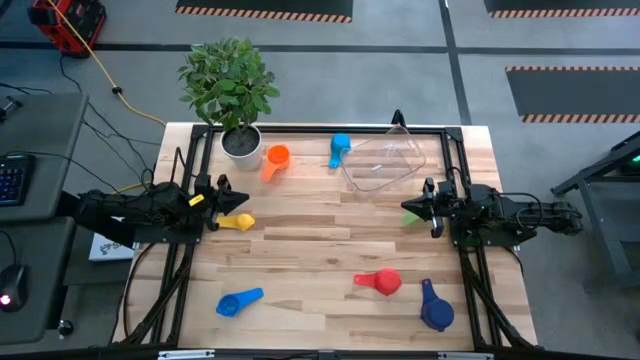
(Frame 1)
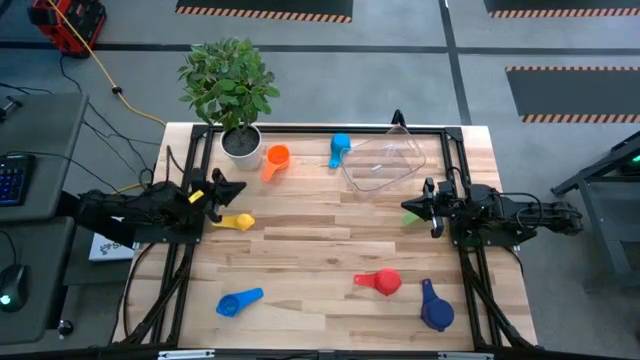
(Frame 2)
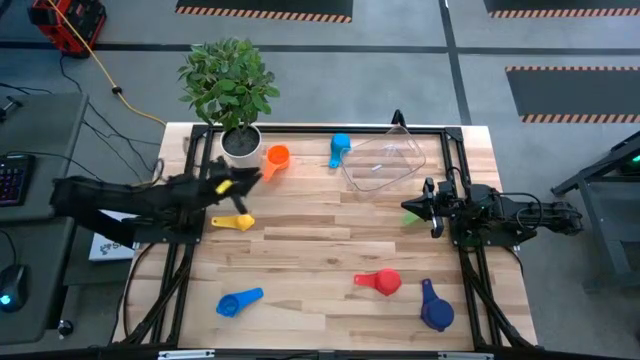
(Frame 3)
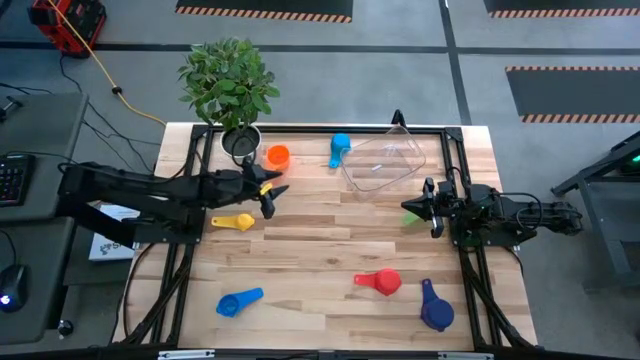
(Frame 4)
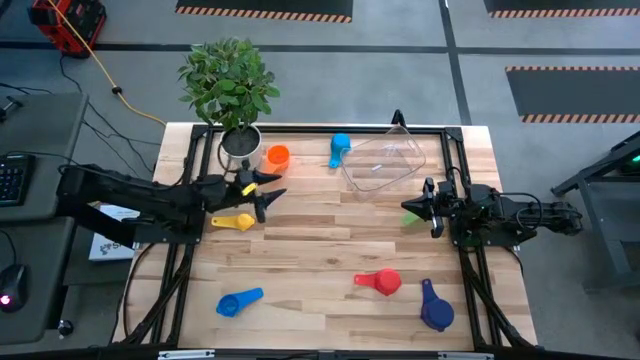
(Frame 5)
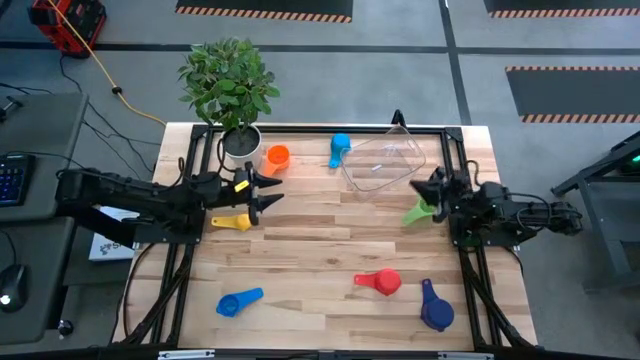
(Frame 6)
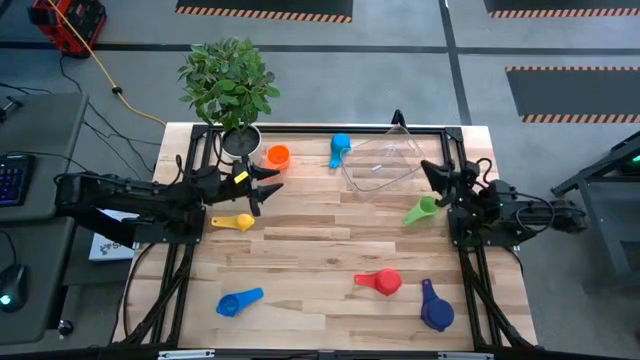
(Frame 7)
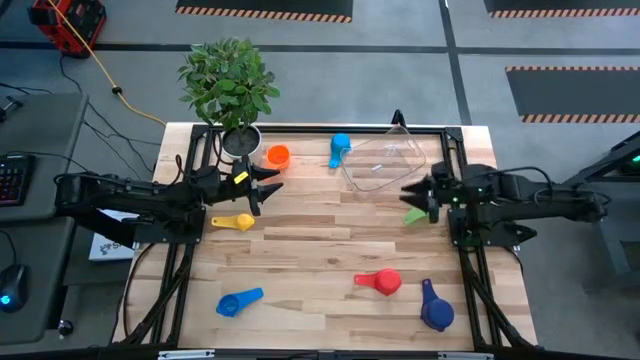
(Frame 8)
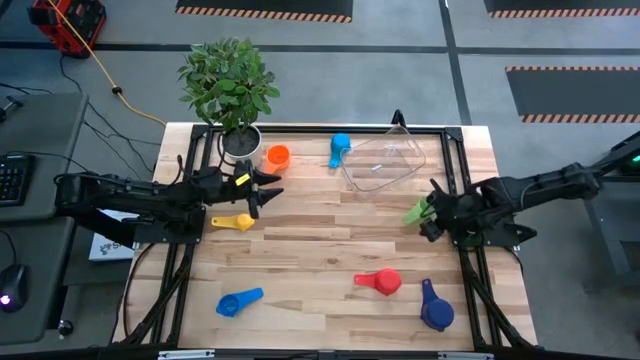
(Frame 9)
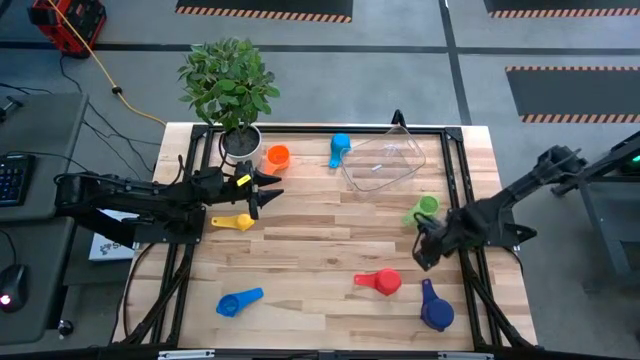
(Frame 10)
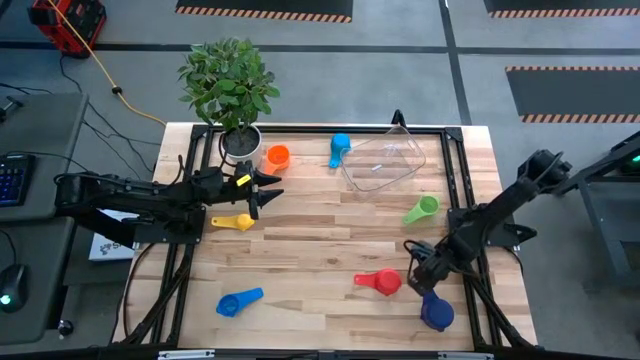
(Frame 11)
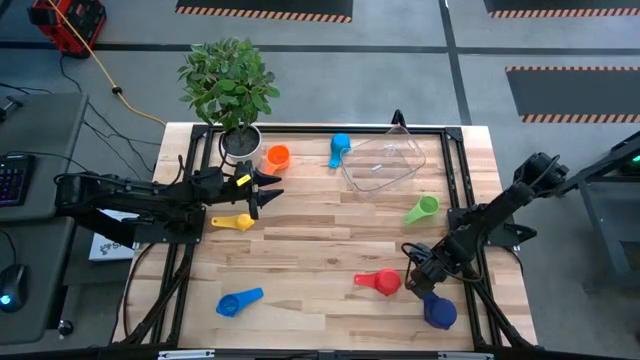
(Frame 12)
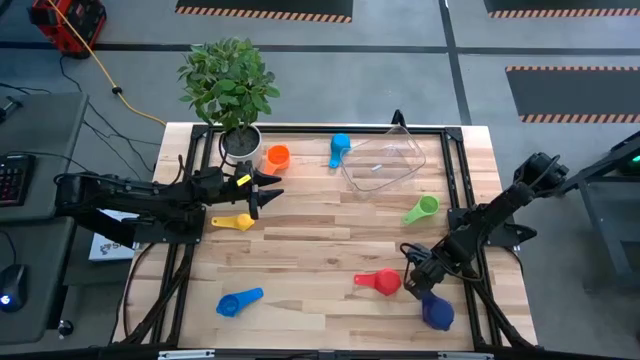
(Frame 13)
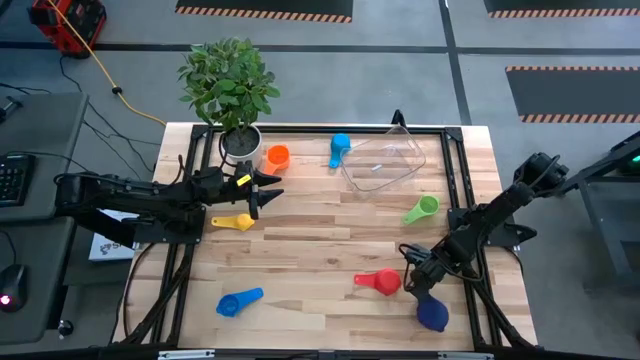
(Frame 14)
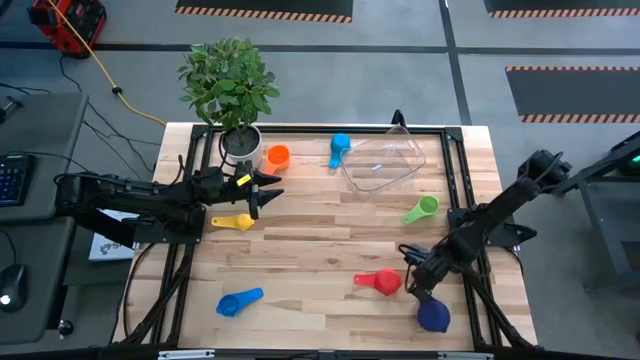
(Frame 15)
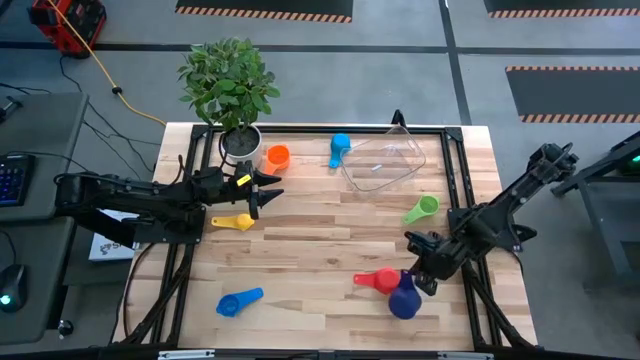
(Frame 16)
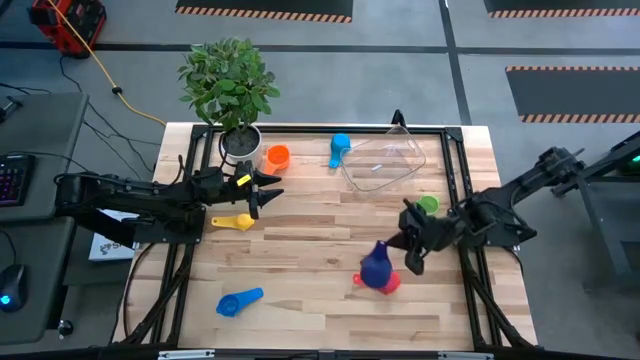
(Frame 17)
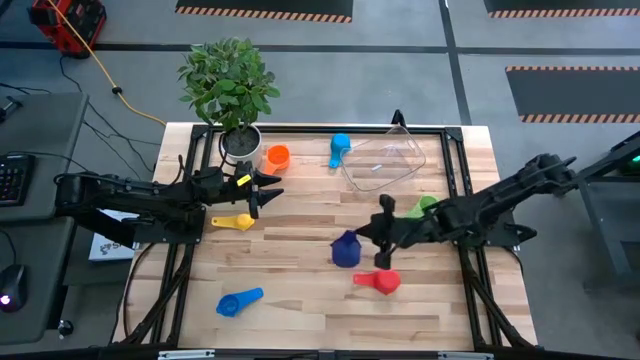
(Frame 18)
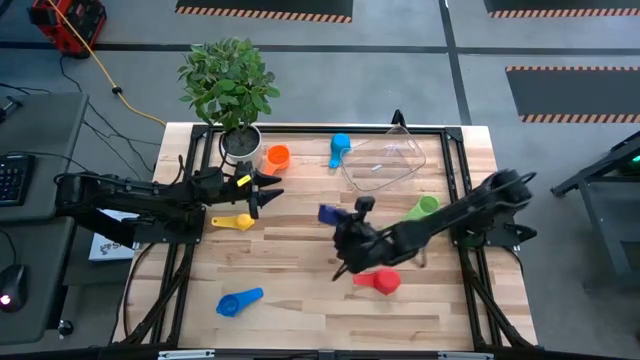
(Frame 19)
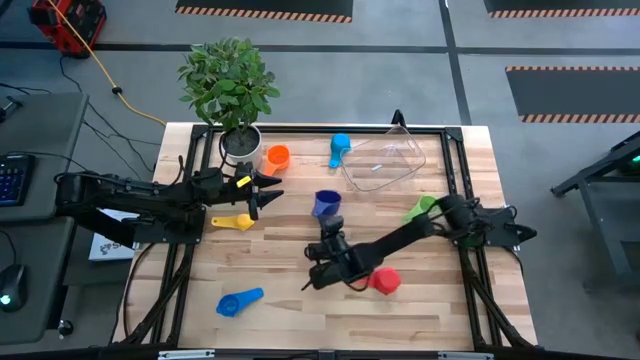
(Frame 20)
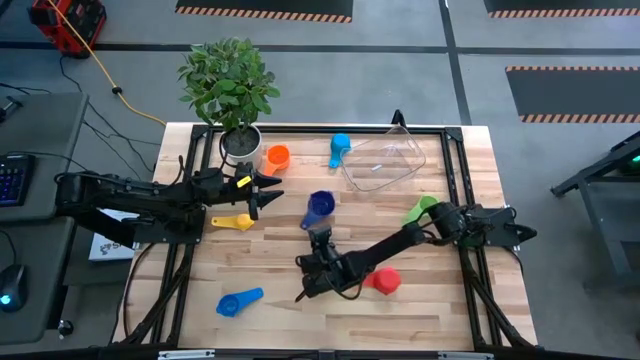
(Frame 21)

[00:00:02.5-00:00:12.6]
Task: Nest measuring cups in basket
Move the violet measuring cup to the center of the table

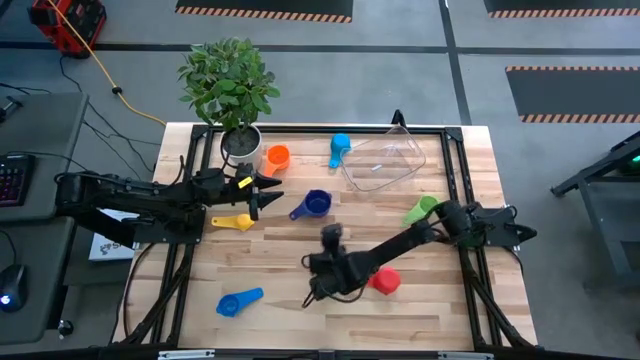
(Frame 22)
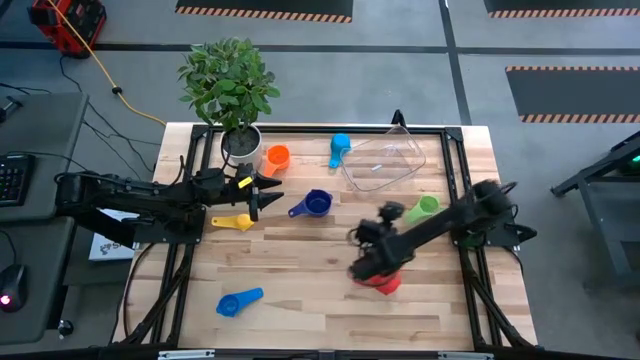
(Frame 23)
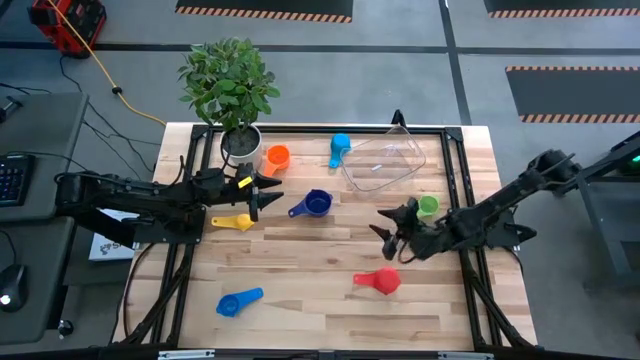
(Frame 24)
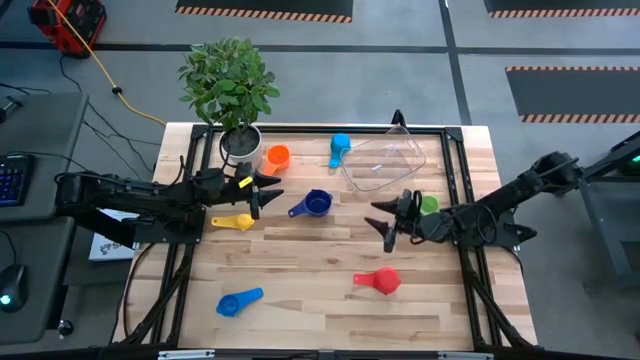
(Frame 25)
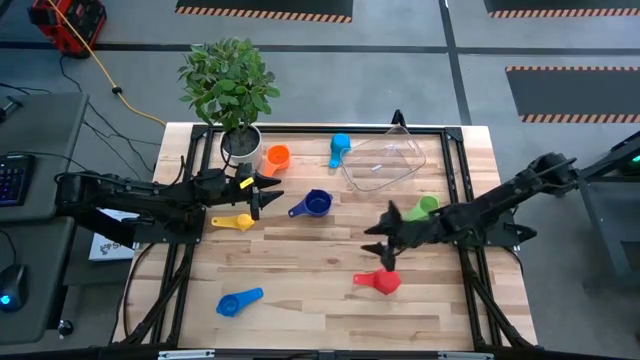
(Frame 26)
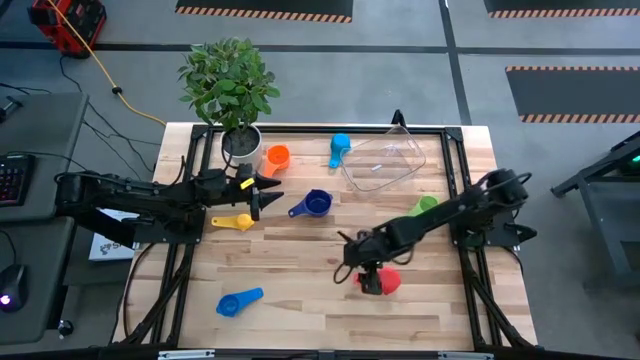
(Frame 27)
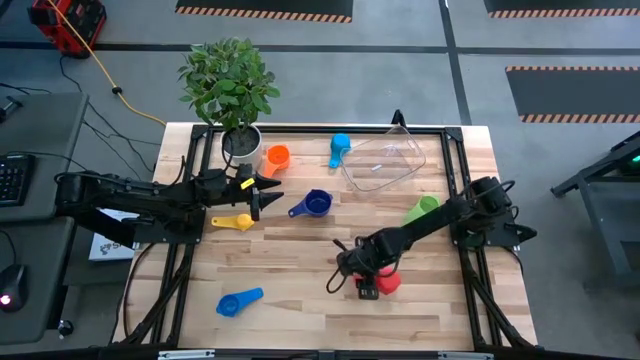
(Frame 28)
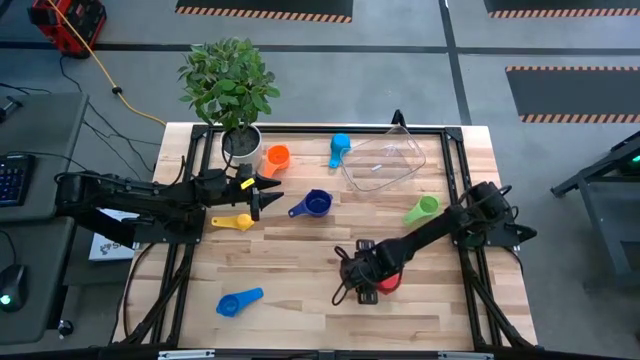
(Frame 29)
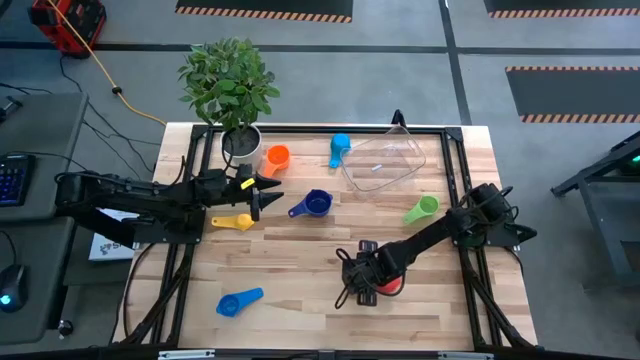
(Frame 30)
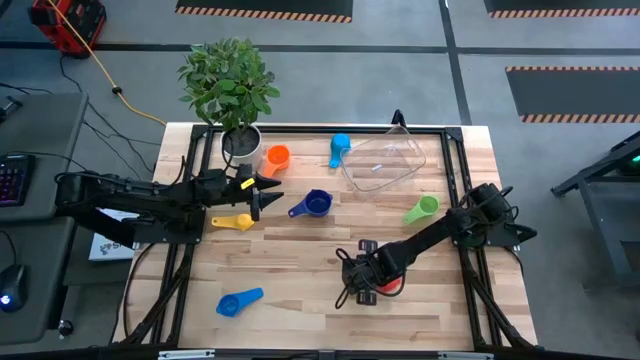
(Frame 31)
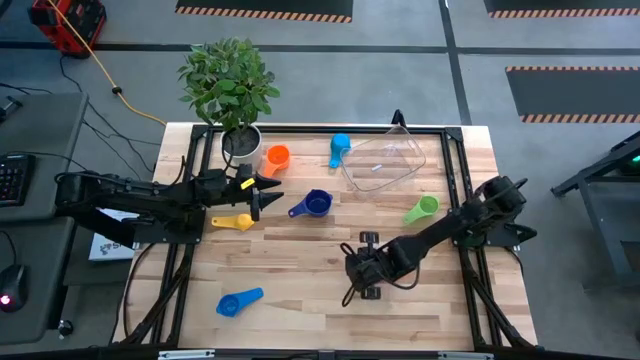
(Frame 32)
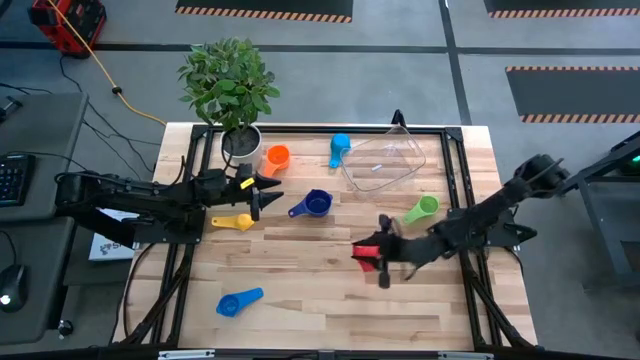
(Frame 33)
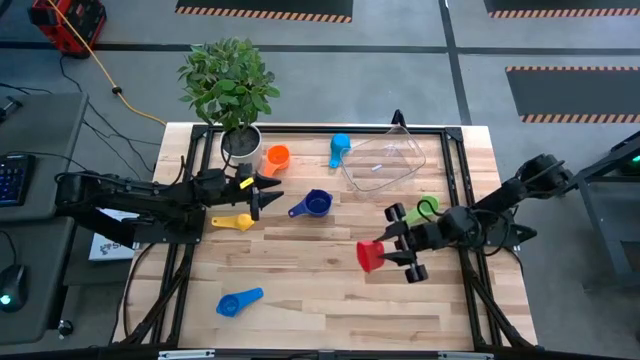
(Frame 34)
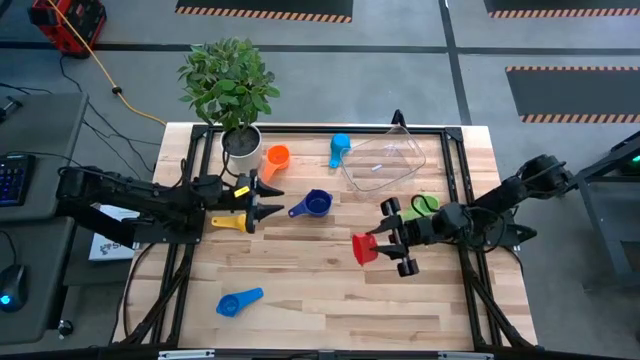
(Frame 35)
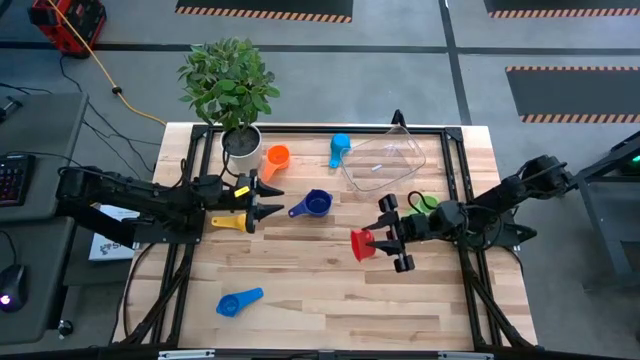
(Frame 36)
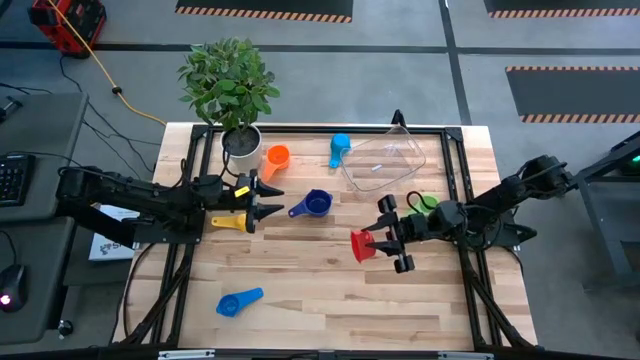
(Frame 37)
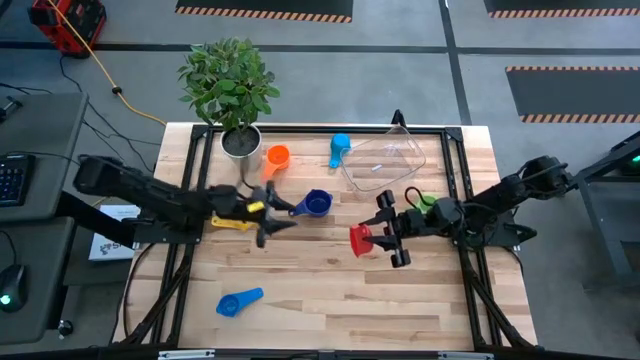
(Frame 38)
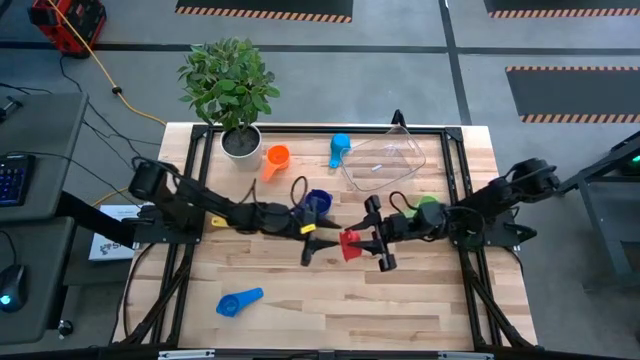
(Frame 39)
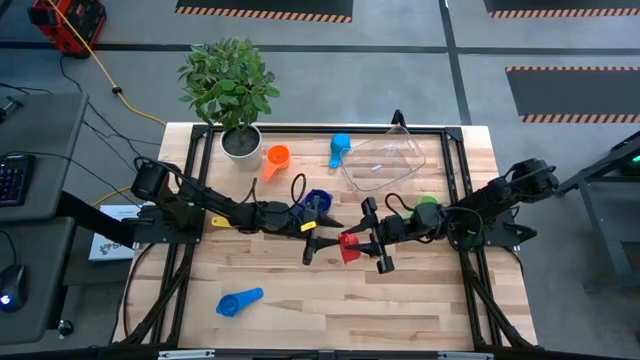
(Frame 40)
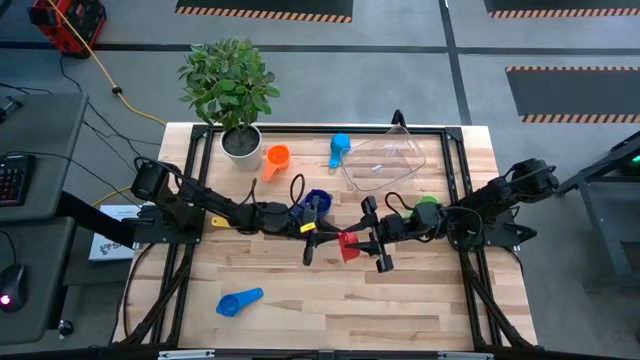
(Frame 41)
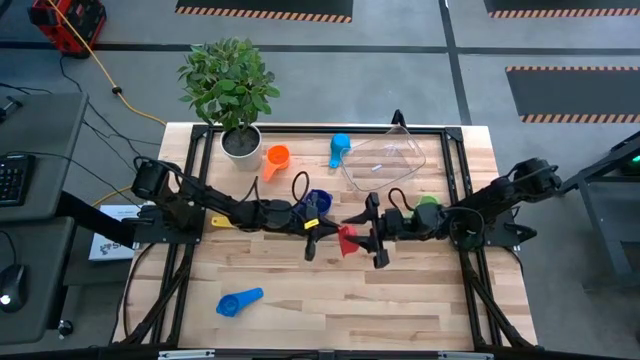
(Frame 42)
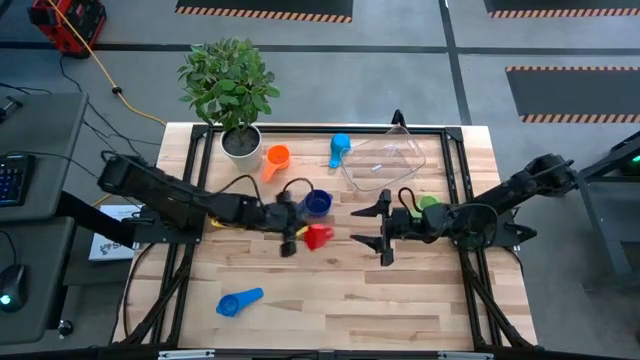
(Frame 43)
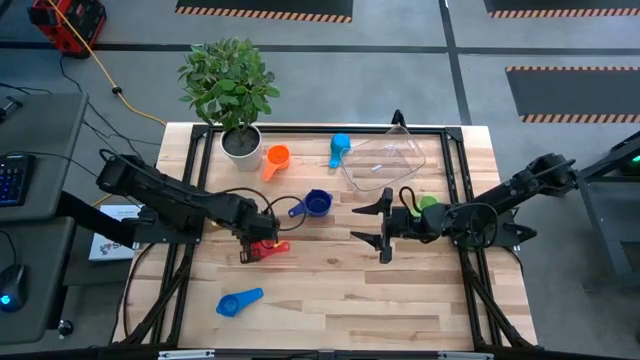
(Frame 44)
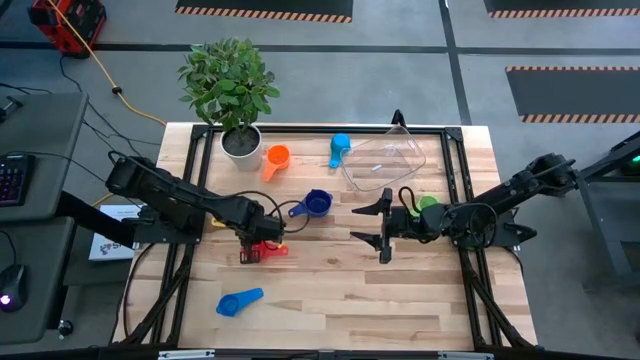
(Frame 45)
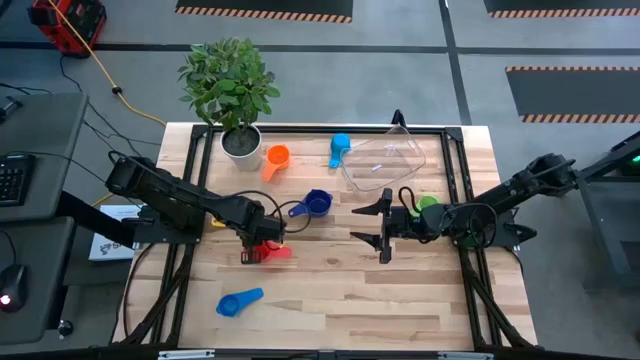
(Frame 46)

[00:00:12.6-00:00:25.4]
Move the red measuring cup to the left side of the table
